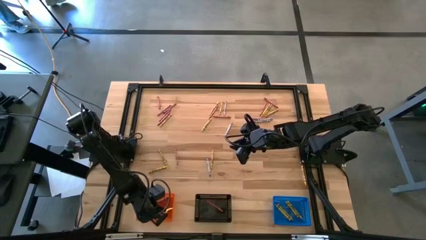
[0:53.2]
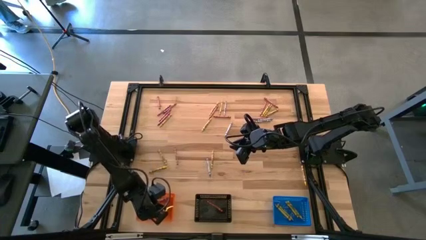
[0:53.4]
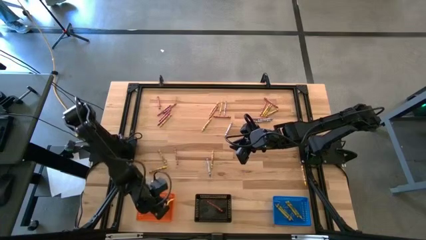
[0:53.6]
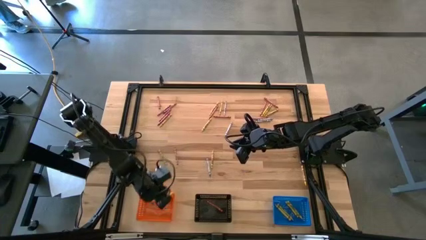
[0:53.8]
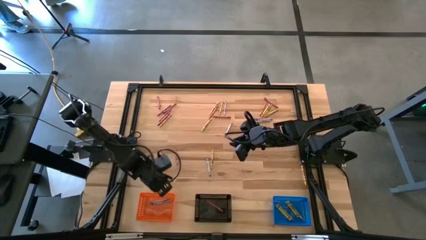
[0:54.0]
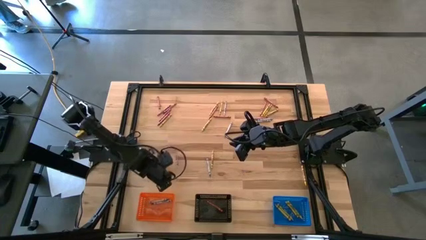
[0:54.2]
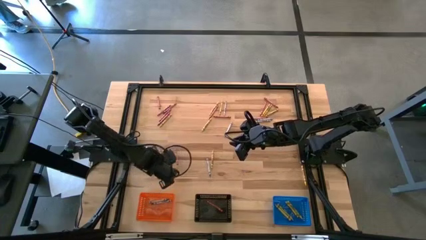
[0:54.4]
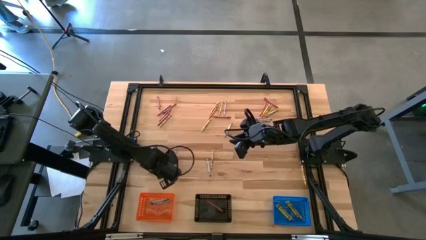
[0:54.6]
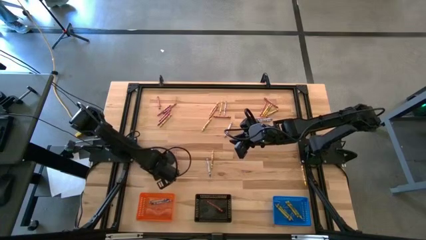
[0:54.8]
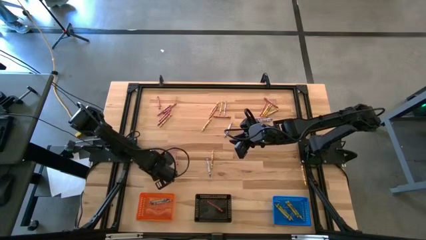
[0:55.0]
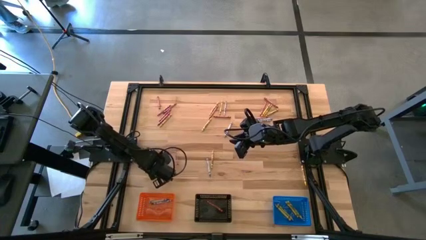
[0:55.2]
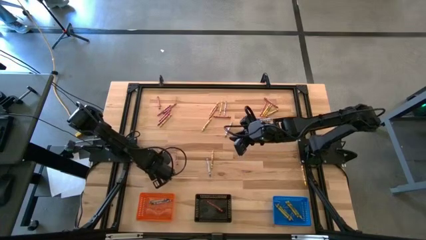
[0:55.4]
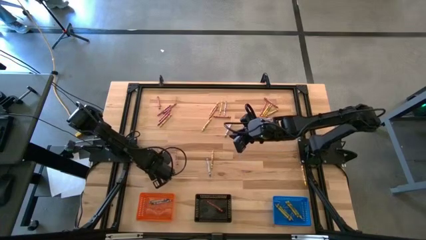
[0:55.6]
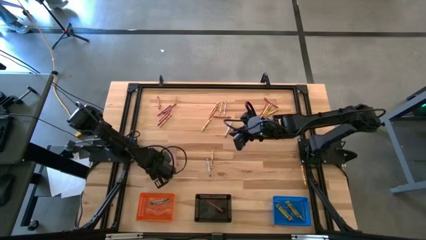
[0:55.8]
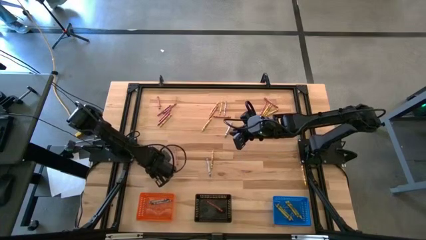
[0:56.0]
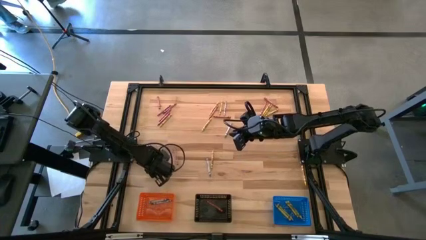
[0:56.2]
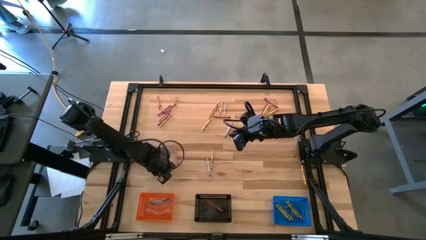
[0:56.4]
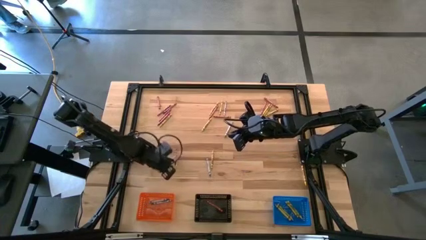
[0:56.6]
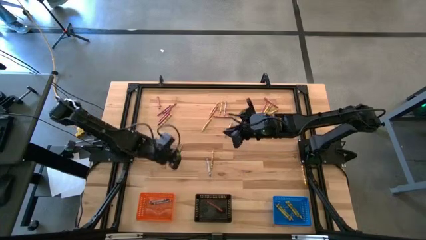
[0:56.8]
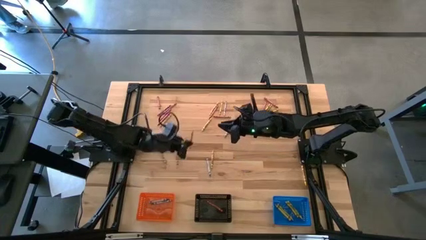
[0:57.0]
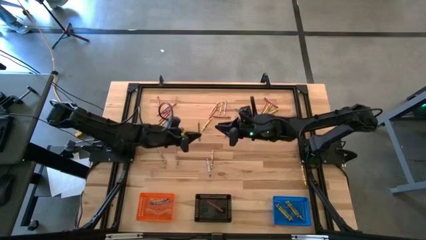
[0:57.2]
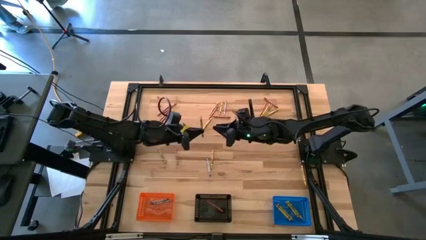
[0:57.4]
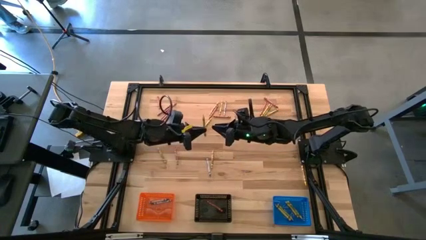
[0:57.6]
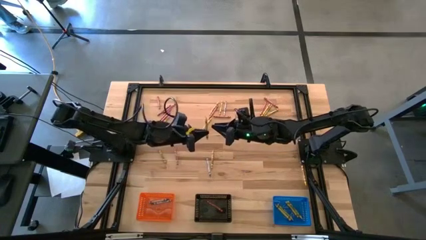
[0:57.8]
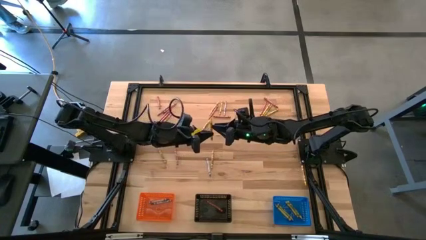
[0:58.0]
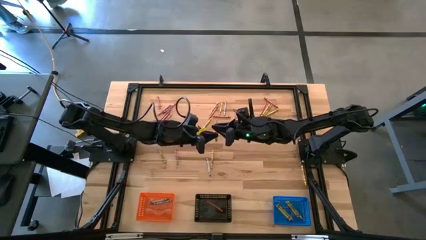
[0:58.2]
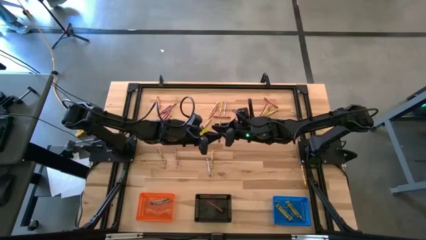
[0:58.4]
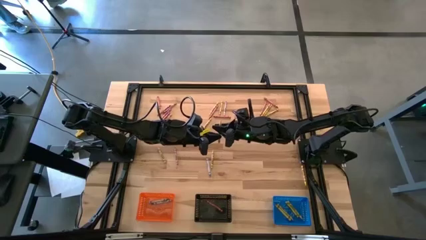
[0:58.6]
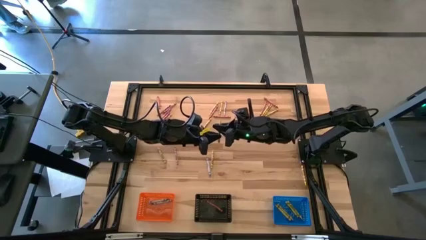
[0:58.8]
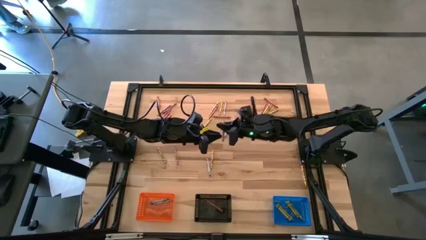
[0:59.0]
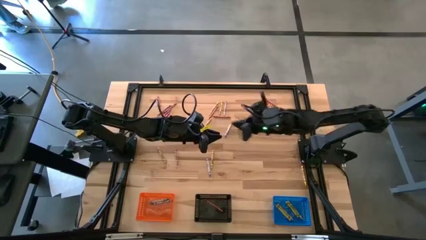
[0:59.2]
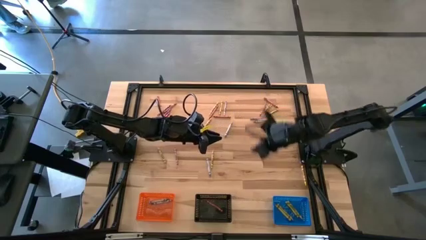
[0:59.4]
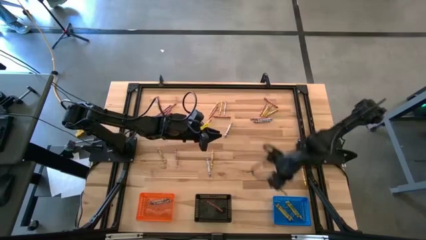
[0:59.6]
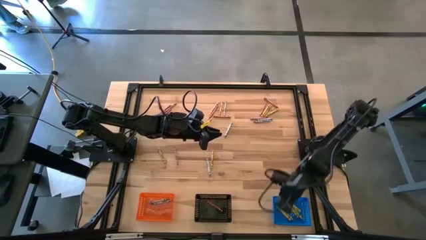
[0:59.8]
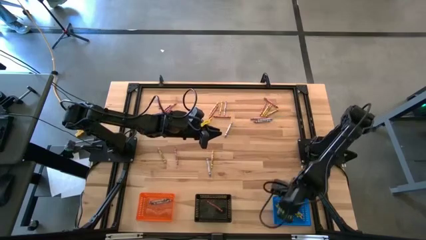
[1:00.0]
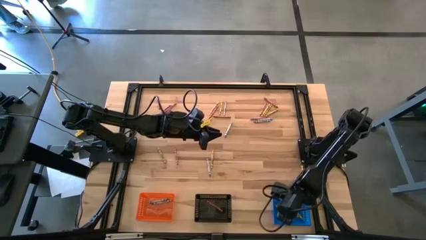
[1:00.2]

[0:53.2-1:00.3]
Task: Sort crayons
Put the yellow crayon into the blue bin

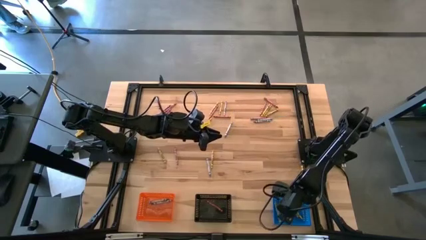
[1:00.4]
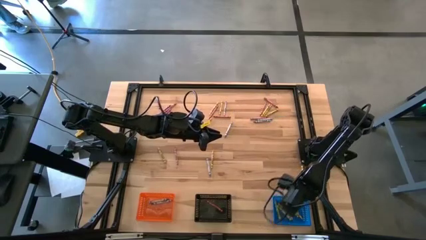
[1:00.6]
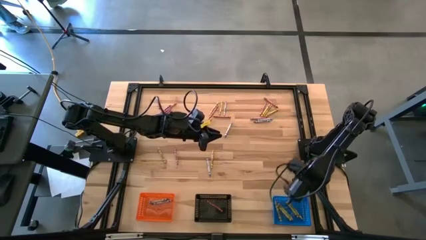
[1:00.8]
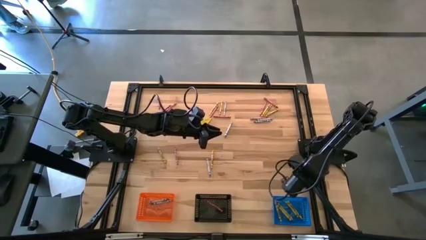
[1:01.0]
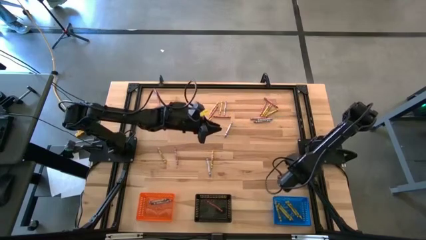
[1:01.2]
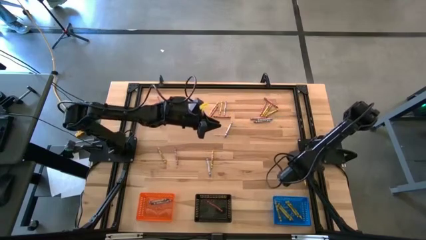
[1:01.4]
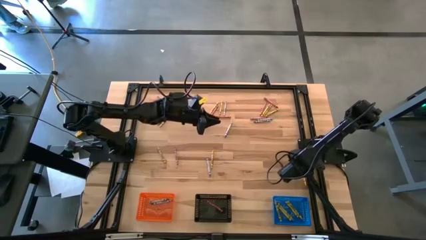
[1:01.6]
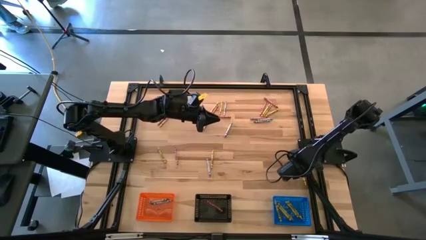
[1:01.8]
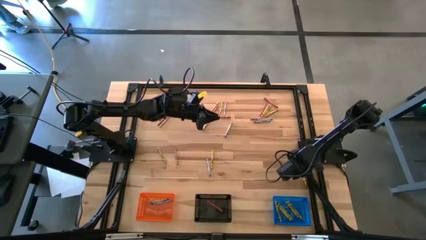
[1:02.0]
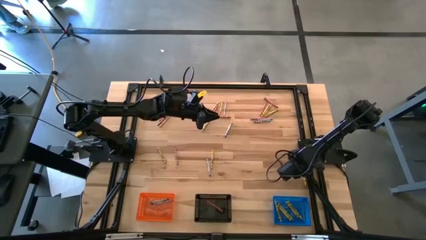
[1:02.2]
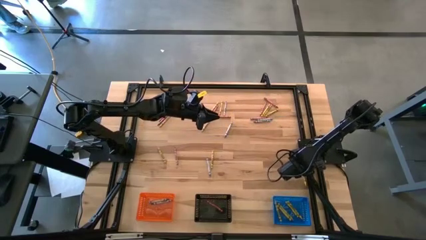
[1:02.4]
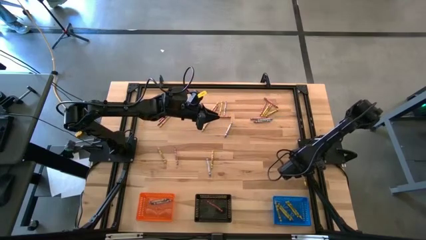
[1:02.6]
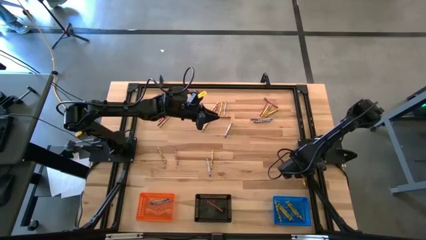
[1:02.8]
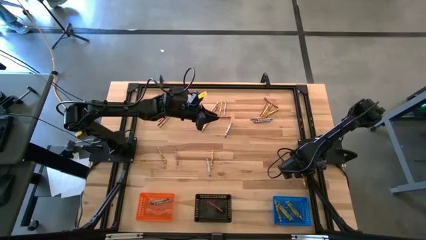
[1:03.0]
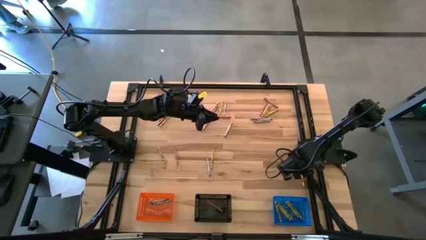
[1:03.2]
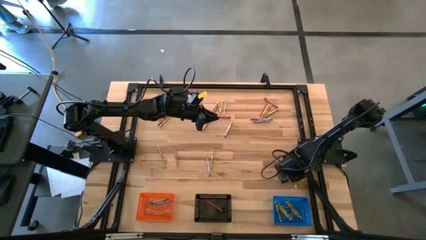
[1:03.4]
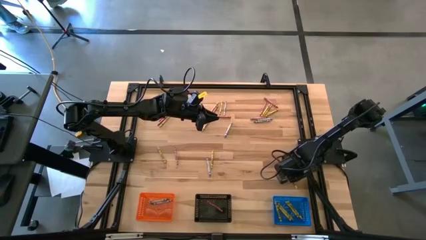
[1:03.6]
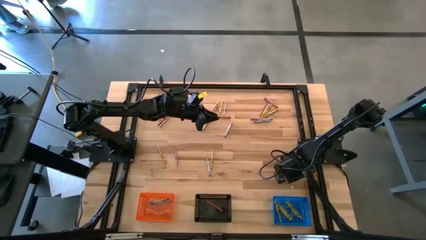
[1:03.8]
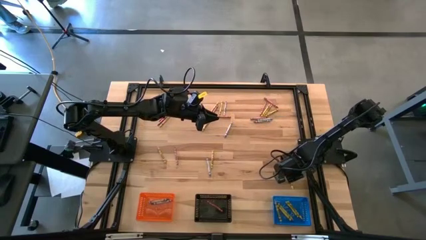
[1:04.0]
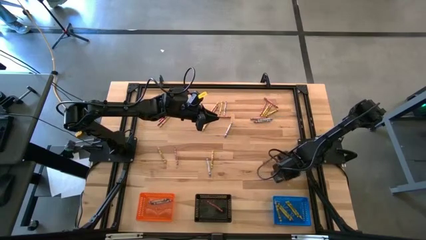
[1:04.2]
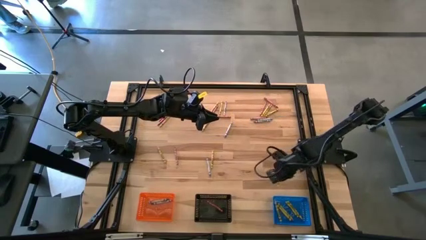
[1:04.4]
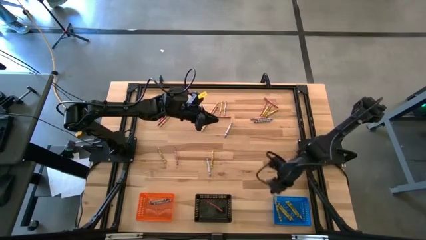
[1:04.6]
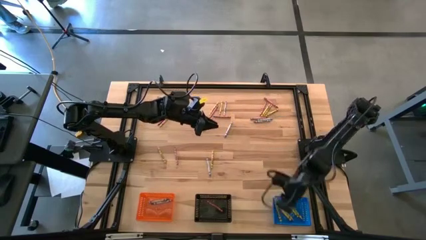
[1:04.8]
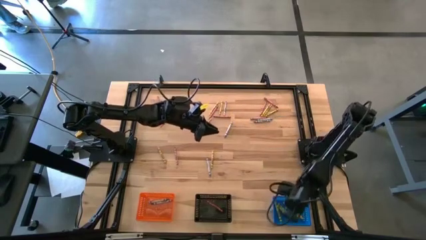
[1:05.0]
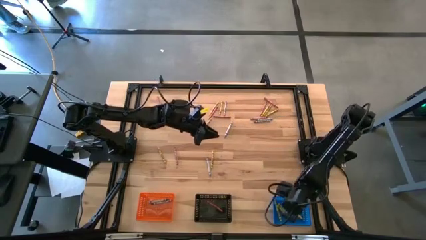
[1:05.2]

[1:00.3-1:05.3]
Put the yellow crayon into the blue bin

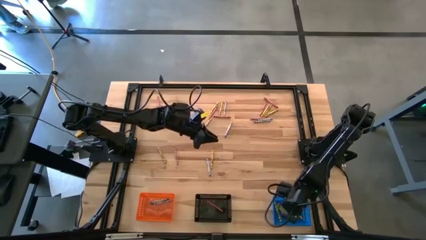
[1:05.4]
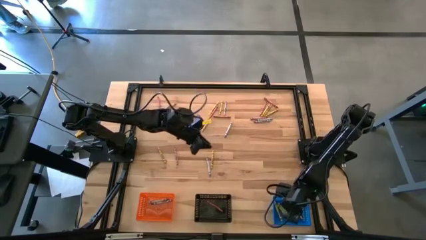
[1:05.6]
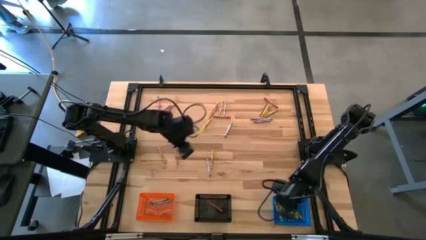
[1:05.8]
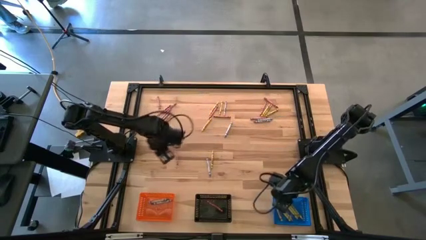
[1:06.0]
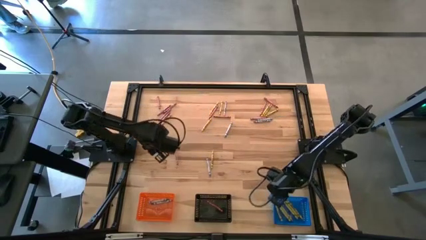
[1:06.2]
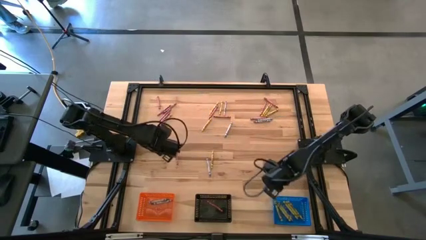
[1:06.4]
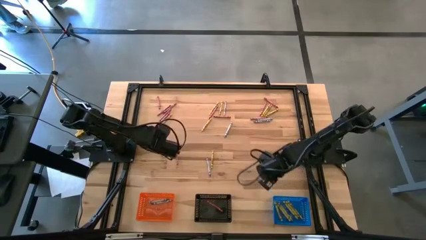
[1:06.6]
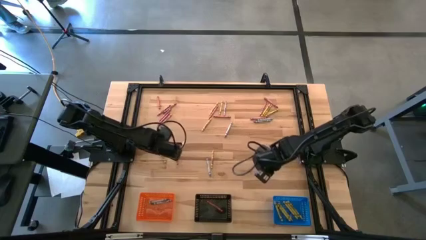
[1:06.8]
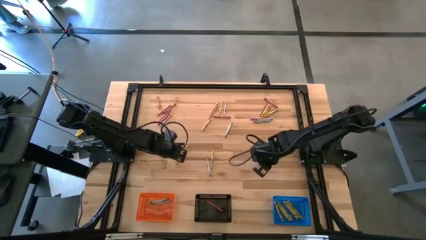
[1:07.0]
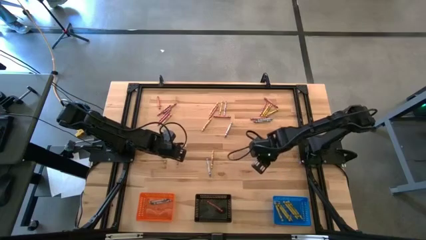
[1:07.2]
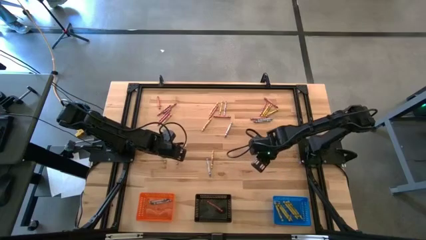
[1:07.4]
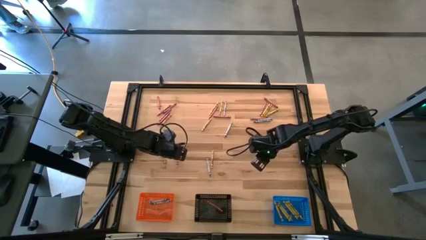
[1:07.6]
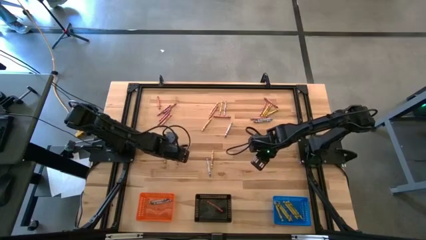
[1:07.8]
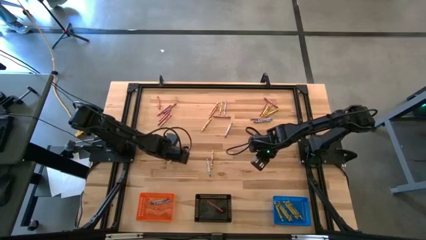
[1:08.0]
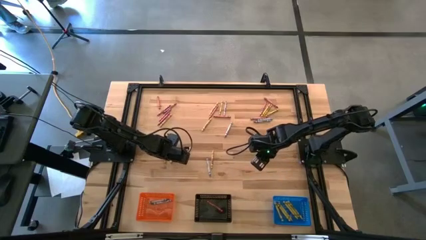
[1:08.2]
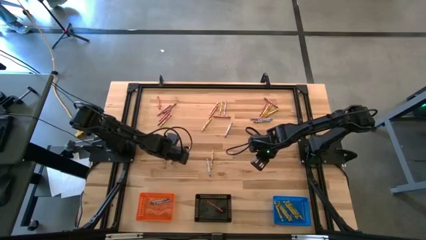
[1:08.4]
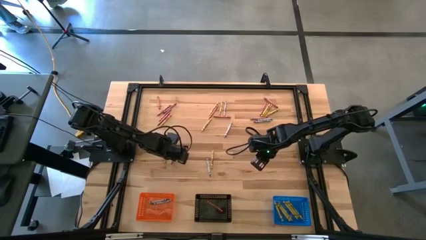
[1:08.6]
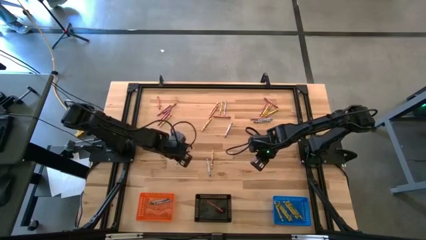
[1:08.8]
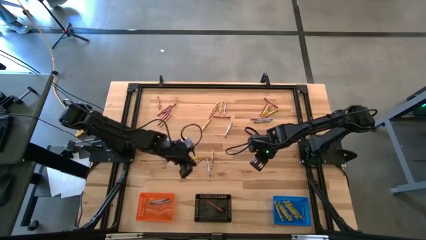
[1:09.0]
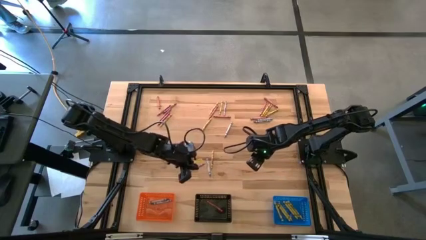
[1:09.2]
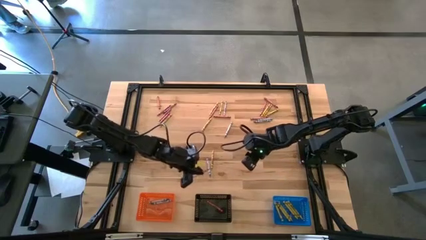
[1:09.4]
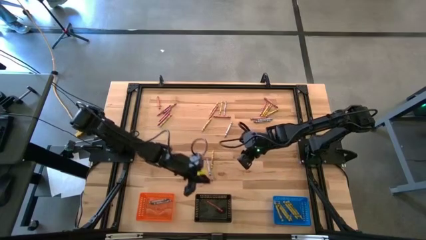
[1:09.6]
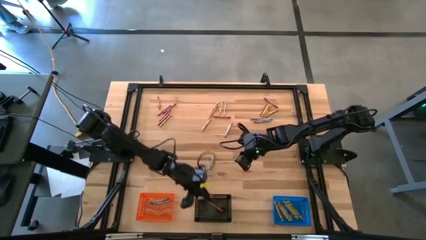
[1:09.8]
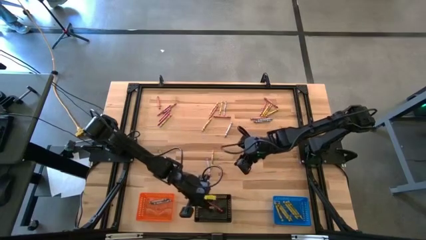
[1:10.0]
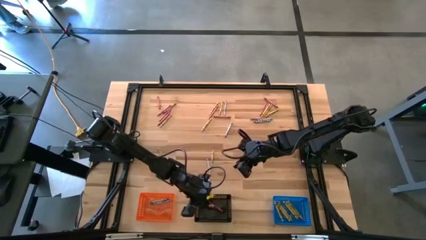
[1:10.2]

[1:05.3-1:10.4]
Put the red crayon into the black bin
